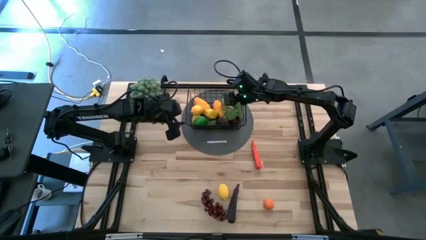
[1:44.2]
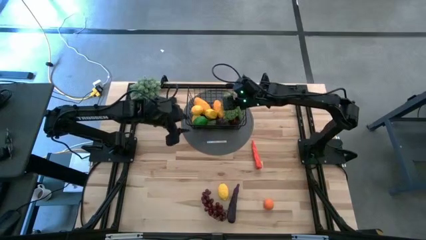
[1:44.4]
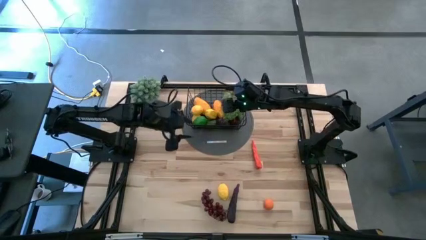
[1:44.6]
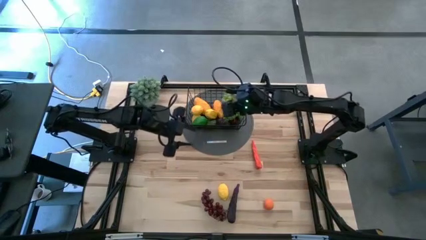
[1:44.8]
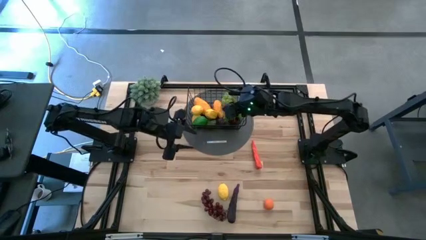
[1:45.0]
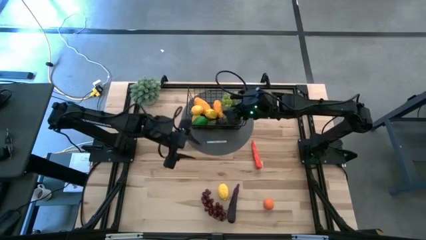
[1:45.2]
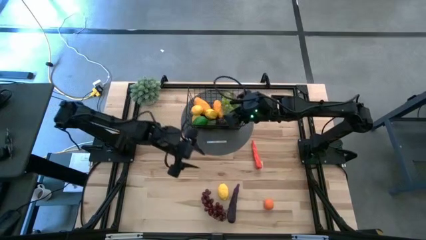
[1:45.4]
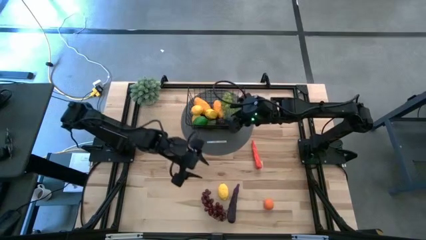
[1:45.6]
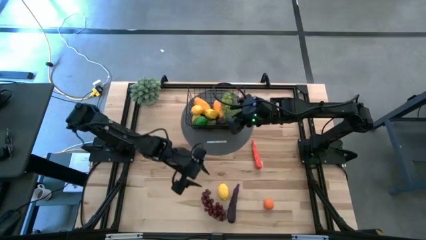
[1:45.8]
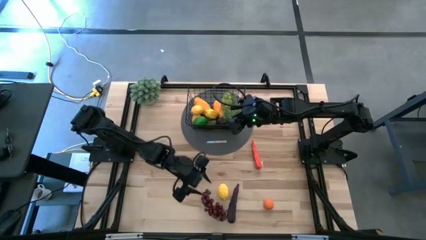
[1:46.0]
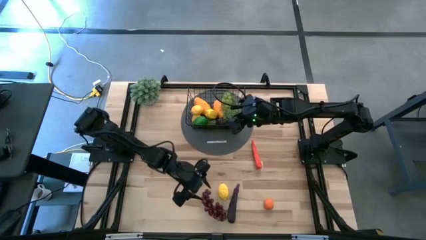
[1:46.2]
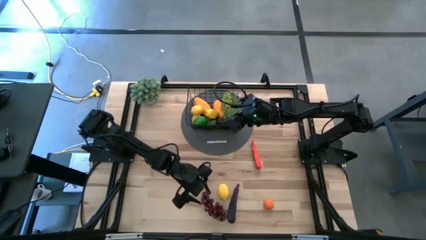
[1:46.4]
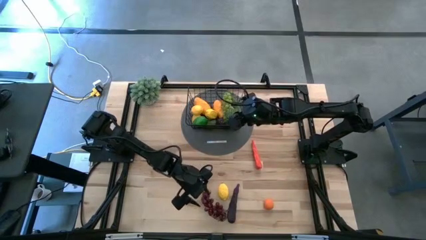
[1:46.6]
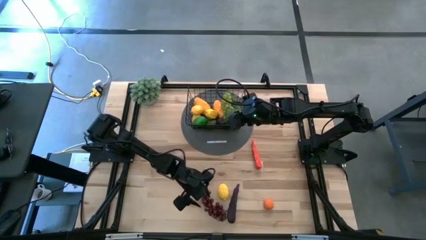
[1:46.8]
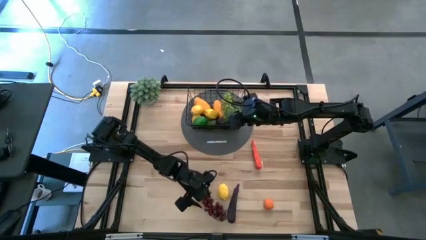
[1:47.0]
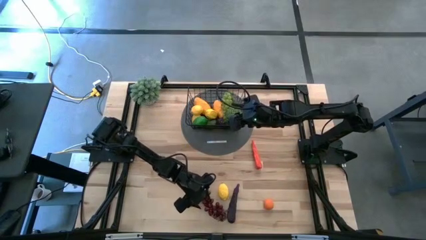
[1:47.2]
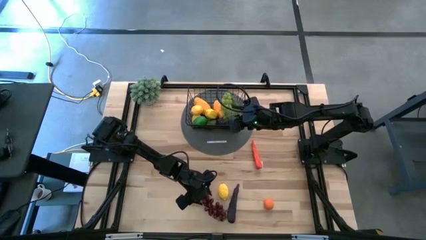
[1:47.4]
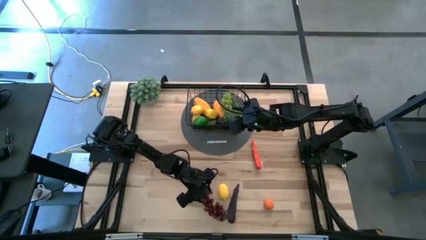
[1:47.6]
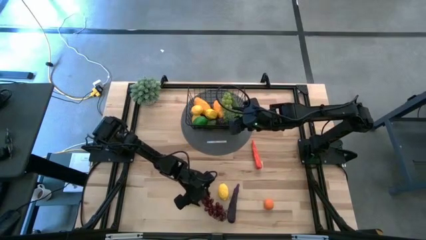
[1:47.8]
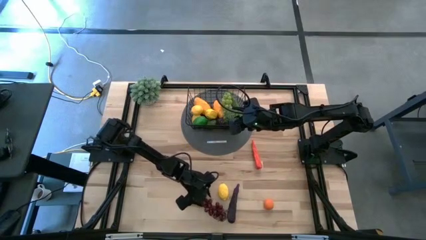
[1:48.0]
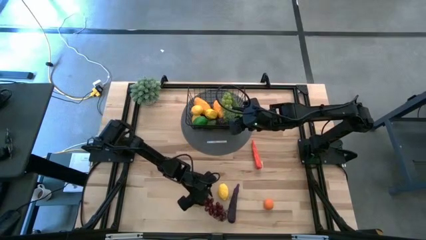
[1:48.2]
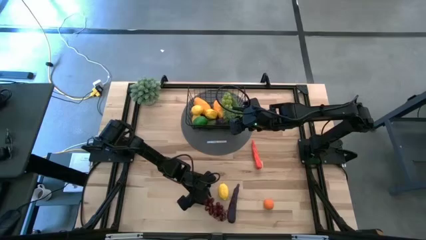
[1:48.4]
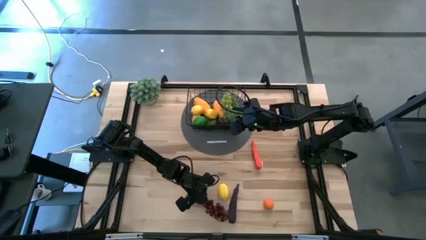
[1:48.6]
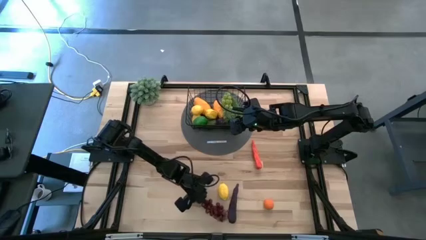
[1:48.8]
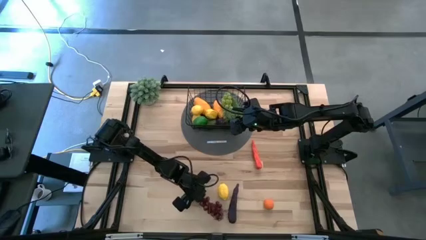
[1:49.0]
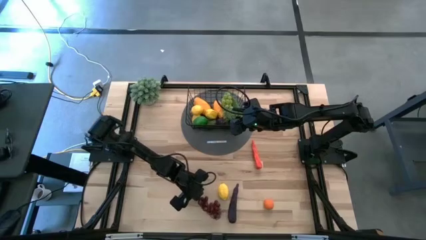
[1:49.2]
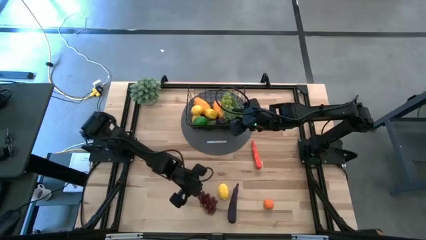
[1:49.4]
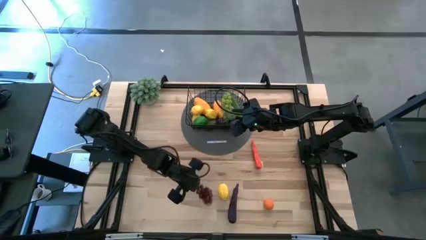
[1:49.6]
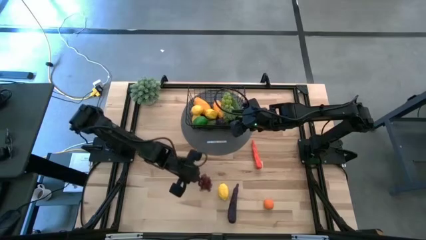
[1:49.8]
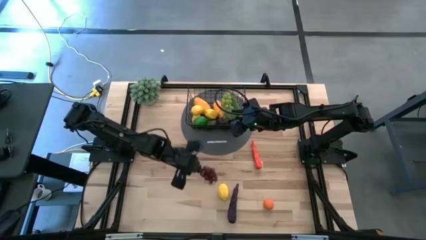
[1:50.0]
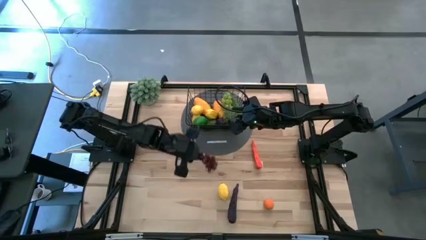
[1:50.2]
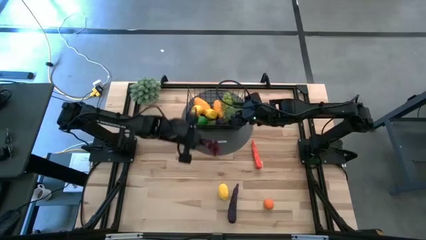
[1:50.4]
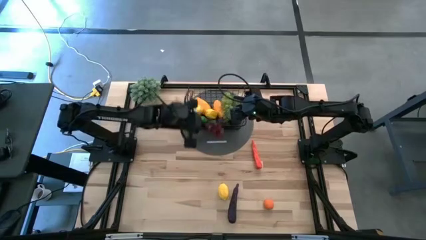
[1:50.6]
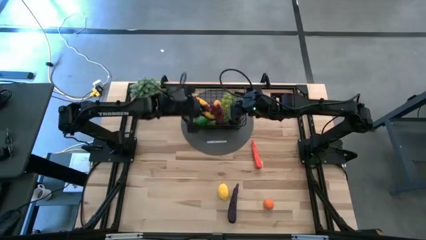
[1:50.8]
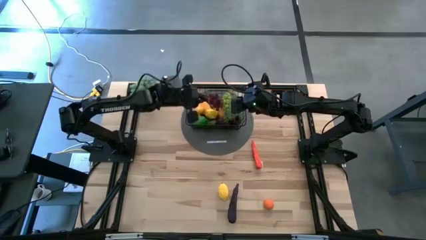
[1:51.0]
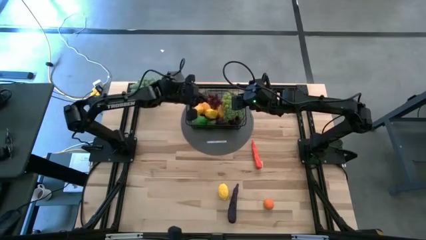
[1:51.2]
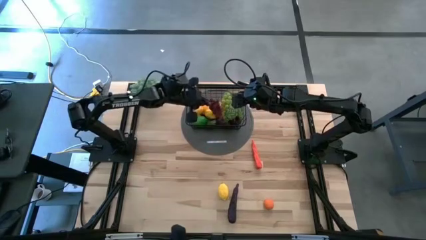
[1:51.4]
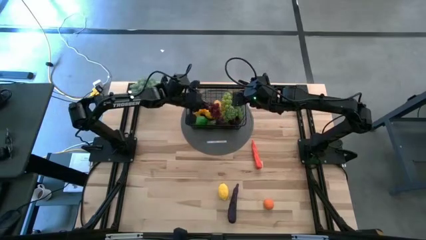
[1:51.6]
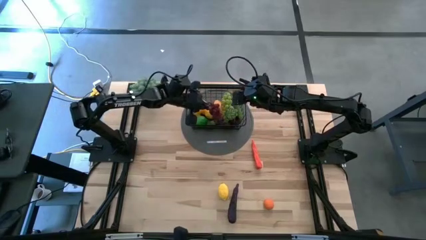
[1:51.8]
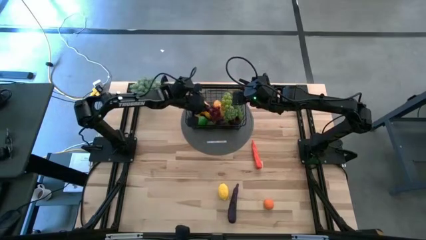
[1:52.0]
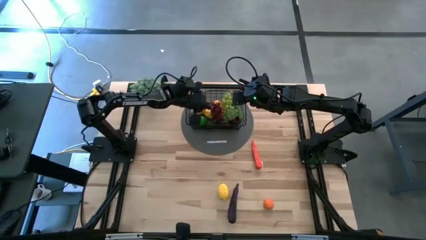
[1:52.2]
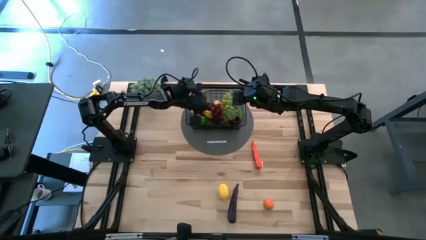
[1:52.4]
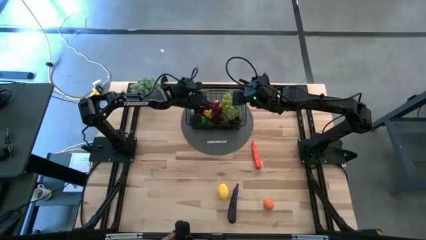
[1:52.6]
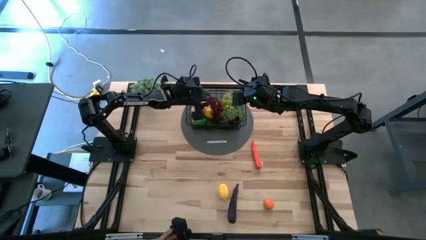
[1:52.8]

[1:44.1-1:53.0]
Task: Build produce basket
Put the red grapes into the black wire basket

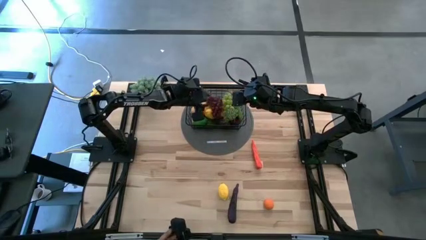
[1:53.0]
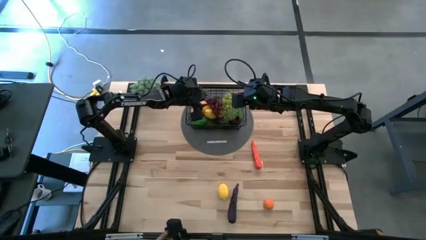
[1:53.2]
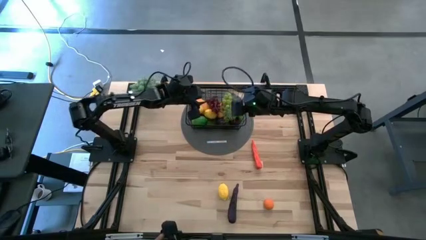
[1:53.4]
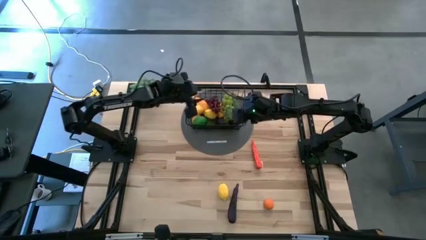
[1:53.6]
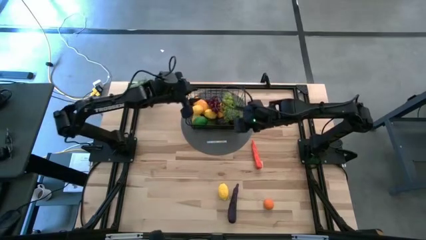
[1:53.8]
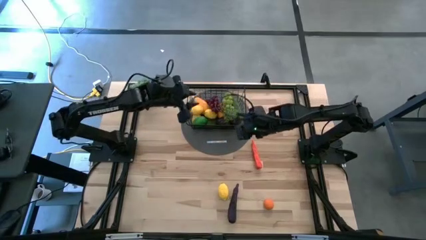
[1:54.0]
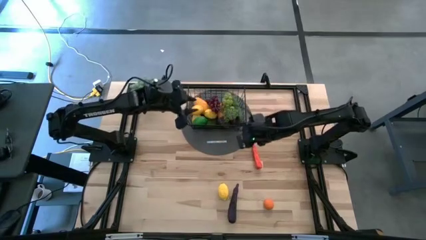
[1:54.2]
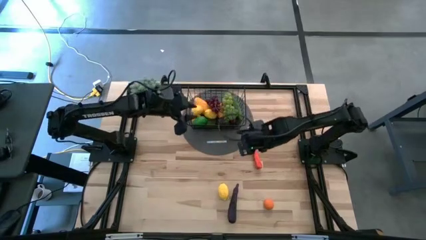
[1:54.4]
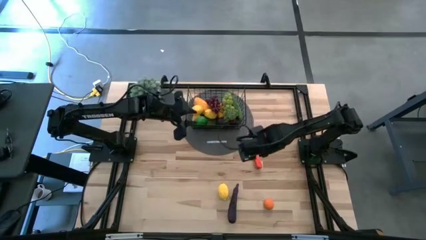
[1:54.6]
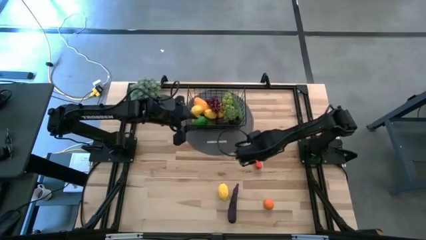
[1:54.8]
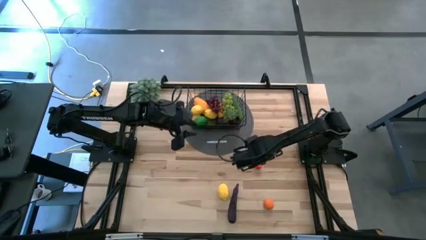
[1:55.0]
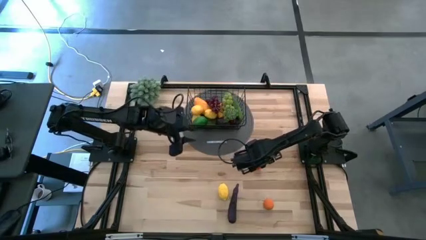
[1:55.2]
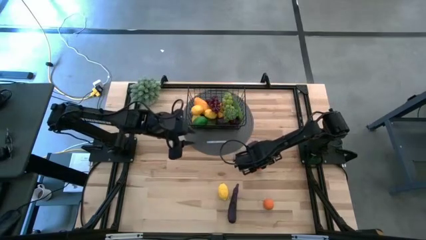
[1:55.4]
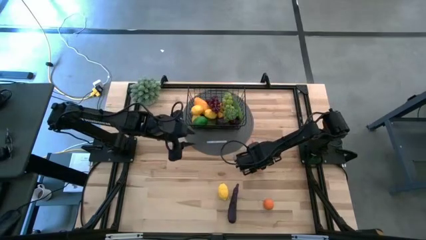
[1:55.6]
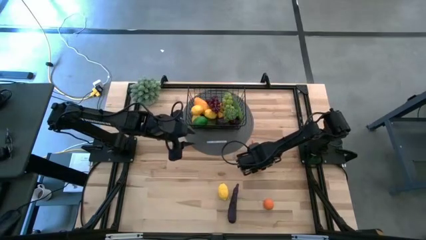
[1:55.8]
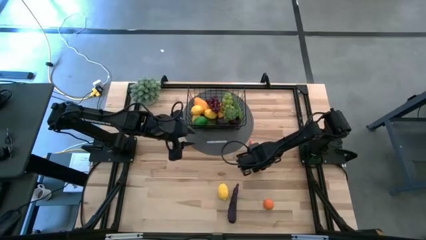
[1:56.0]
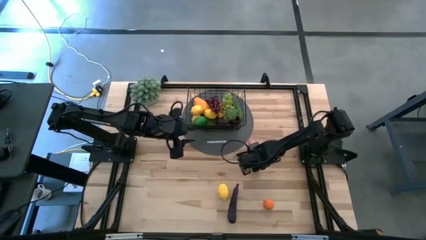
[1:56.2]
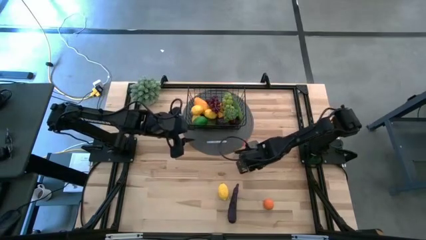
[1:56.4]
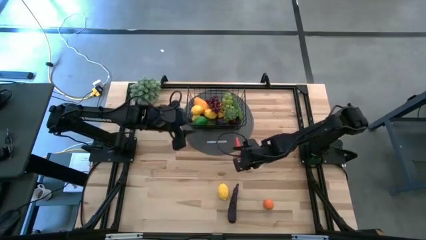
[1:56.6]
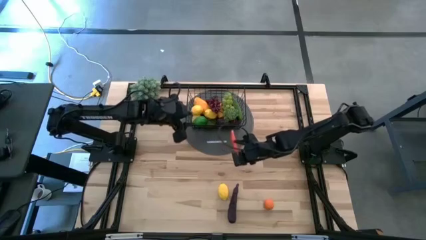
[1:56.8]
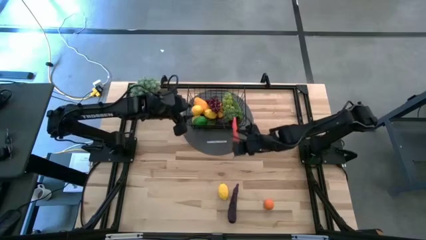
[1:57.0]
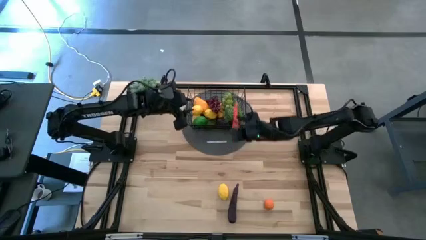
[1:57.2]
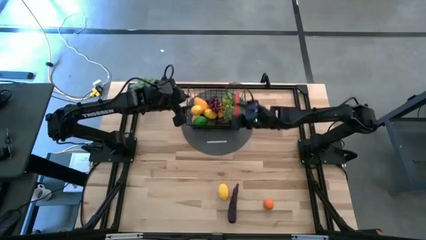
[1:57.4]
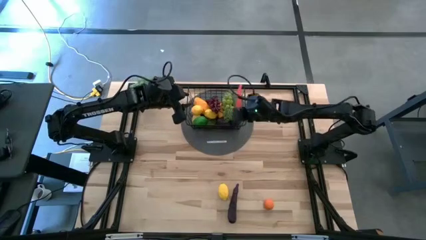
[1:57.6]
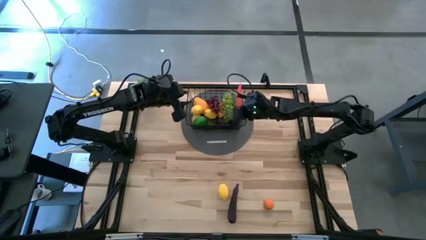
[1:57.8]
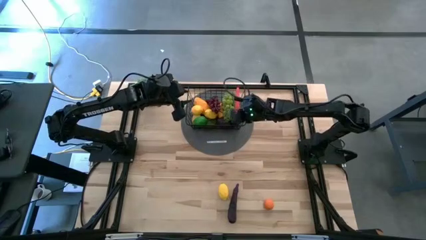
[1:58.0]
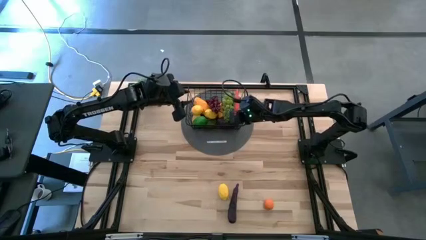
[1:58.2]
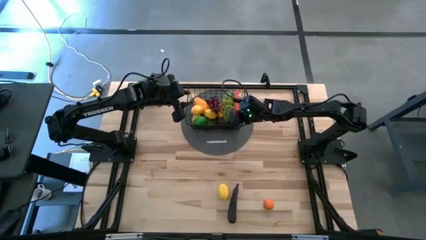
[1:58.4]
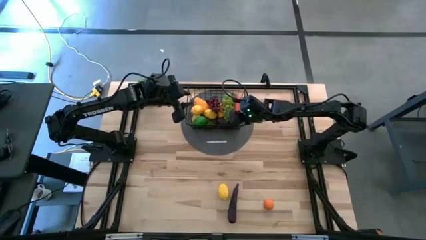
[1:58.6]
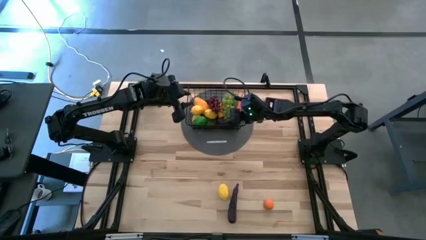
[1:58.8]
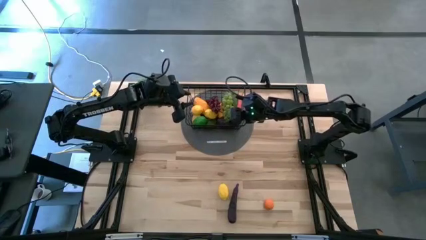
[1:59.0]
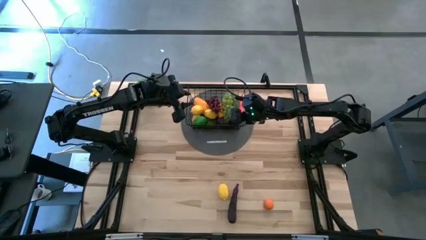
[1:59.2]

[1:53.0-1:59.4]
Put the orange carrot into the black wire basket

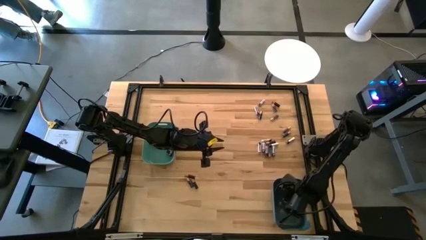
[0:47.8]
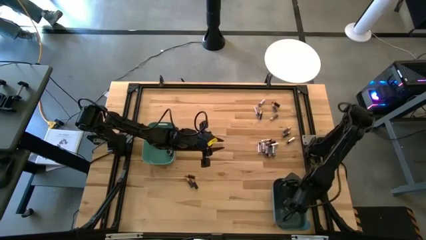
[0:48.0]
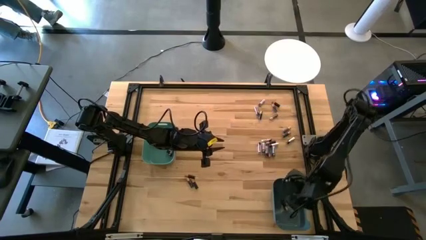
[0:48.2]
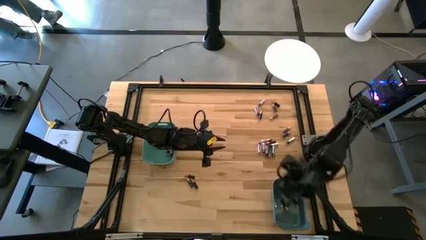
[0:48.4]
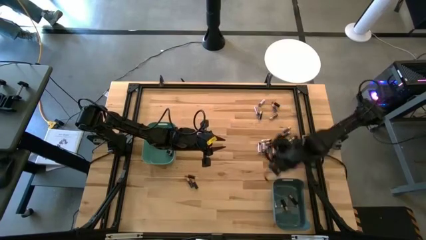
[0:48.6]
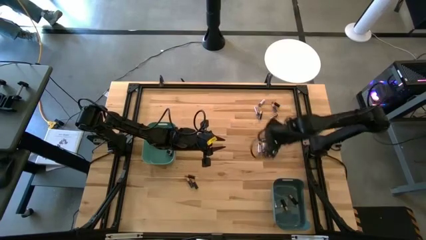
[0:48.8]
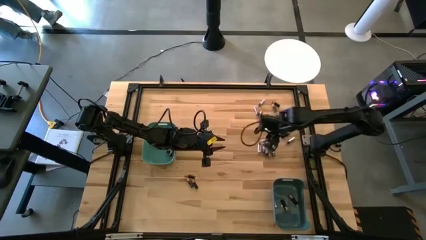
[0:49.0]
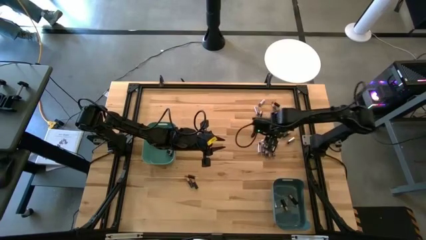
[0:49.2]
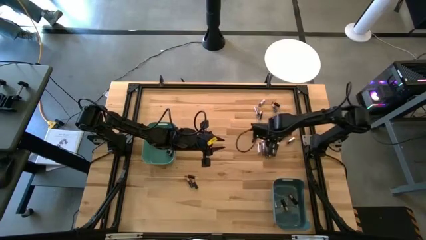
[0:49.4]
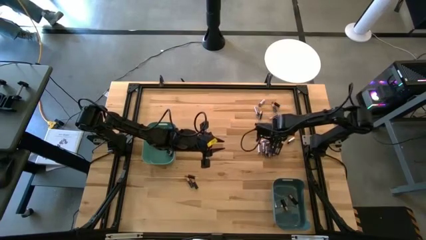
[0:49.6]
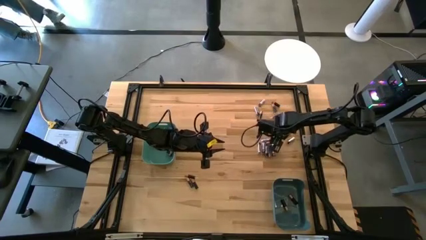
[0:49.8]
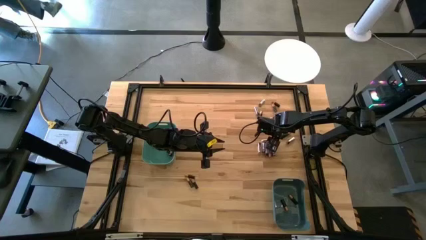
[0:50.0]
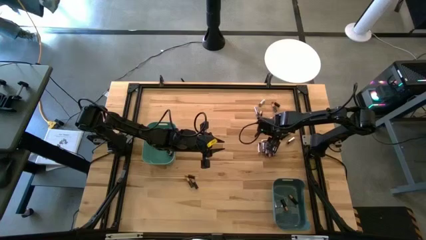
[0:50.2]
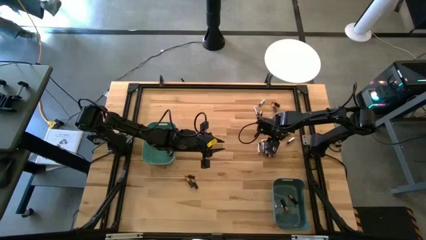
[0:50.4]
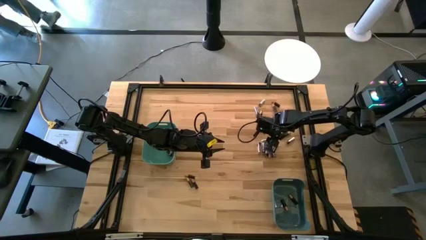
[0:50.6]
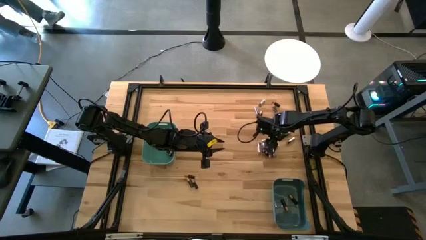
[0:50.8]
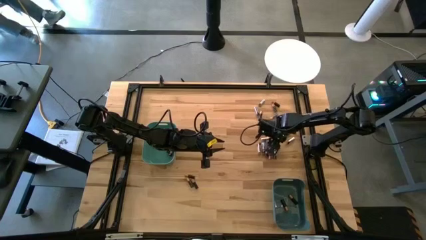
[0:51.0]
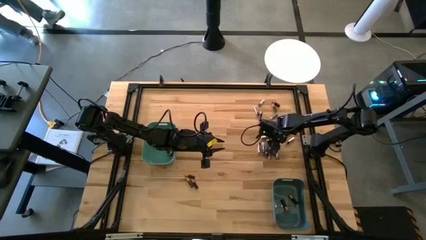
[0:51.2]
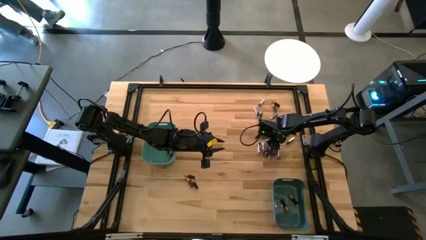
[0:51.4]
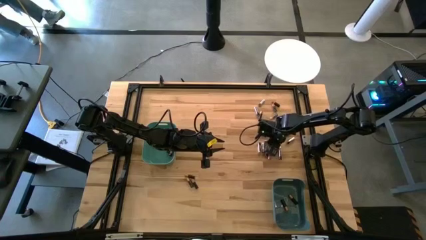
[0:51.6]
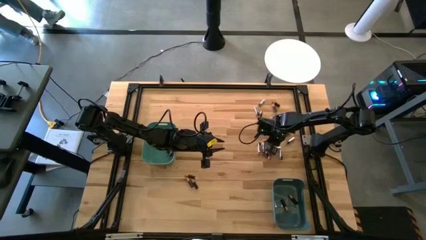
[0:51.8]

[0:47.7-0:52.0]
Task: Sort batteries
Put the black battery into the blue bin
